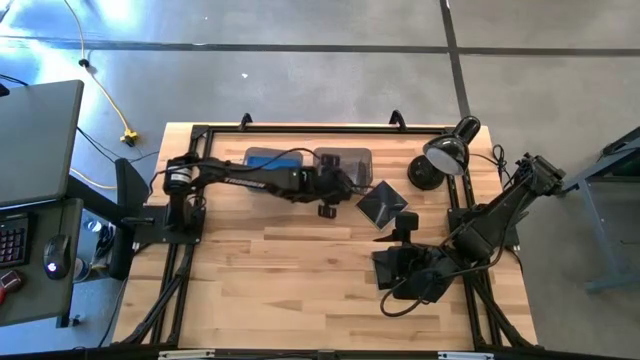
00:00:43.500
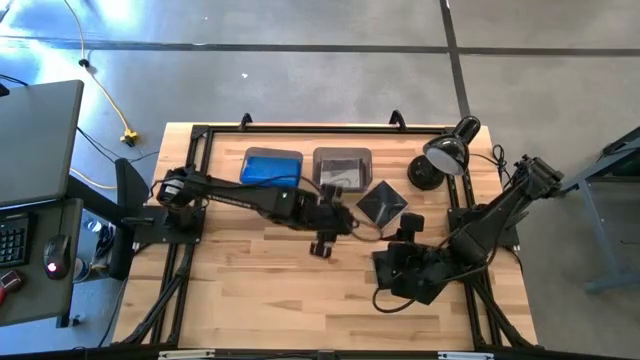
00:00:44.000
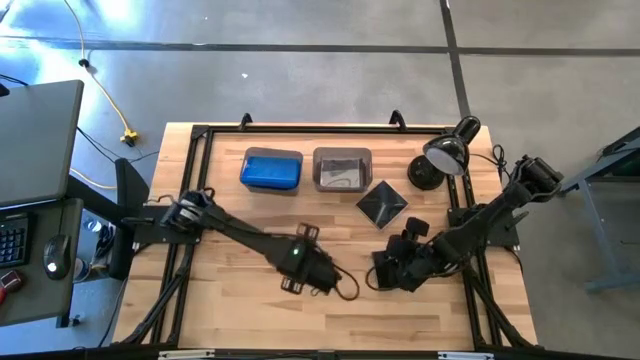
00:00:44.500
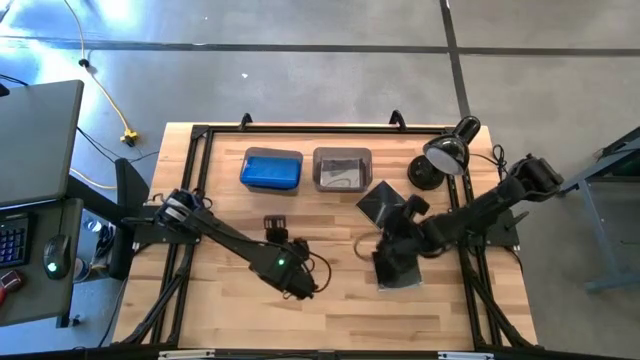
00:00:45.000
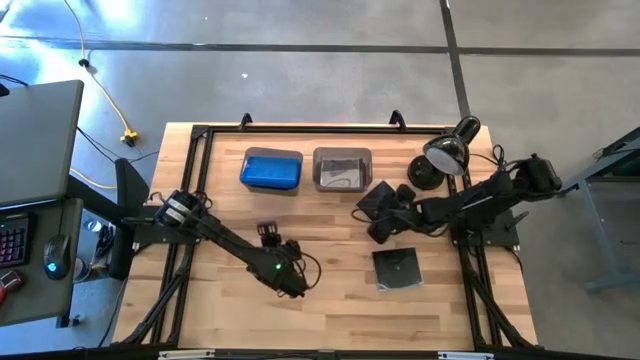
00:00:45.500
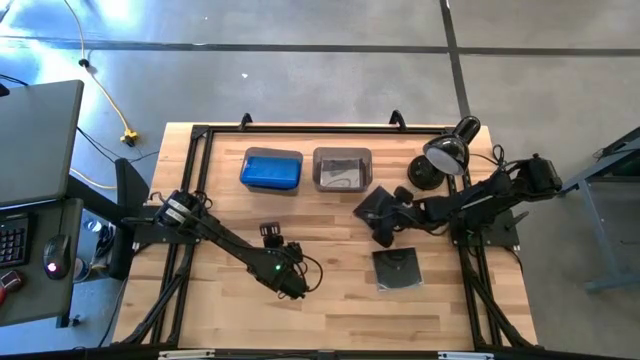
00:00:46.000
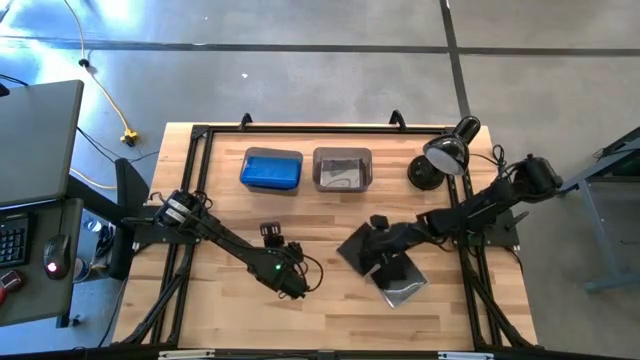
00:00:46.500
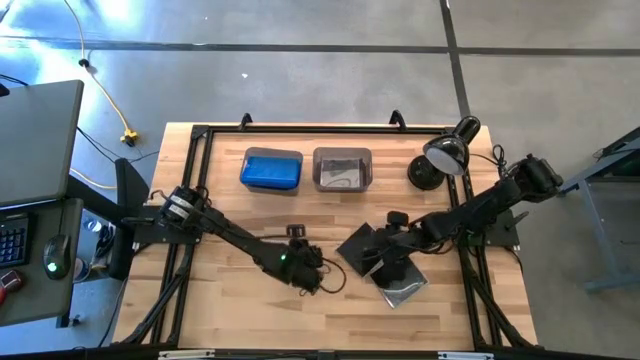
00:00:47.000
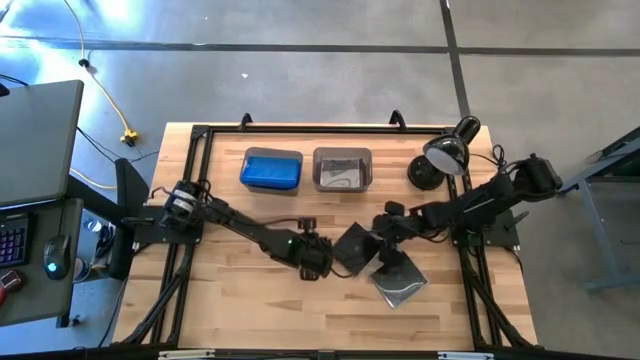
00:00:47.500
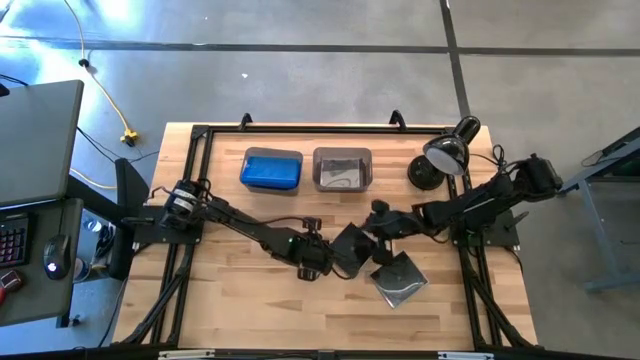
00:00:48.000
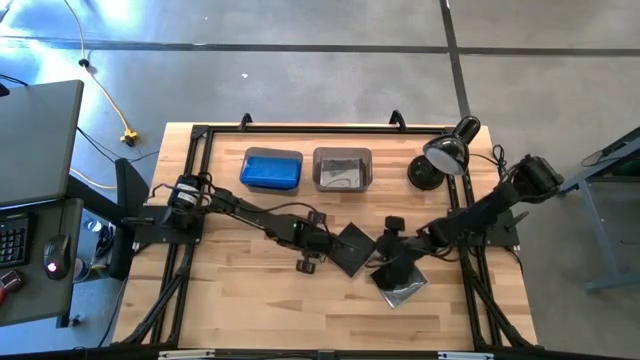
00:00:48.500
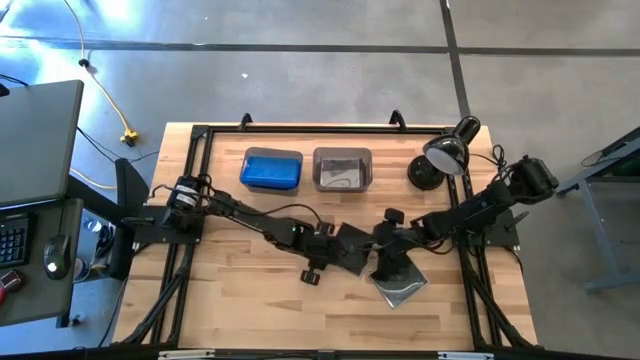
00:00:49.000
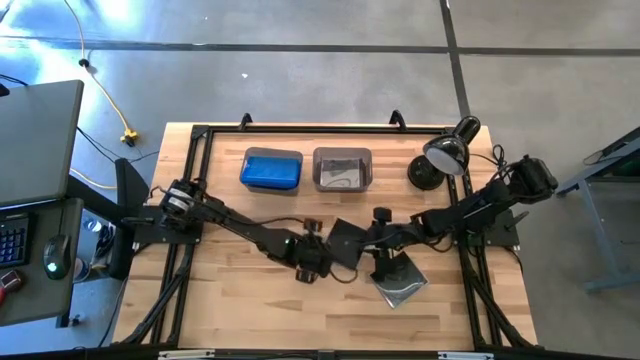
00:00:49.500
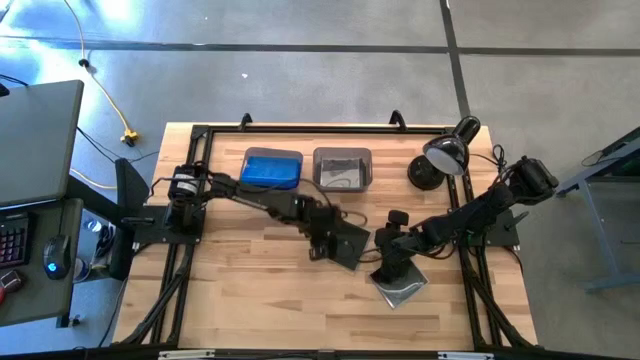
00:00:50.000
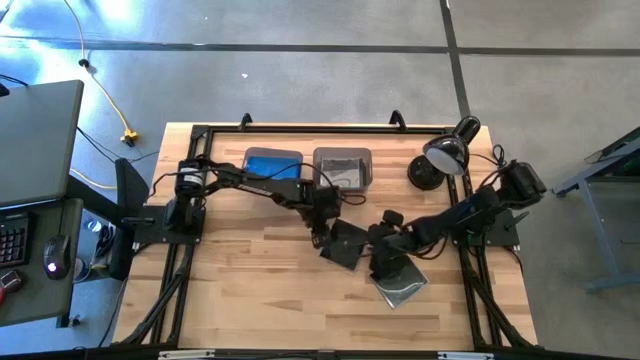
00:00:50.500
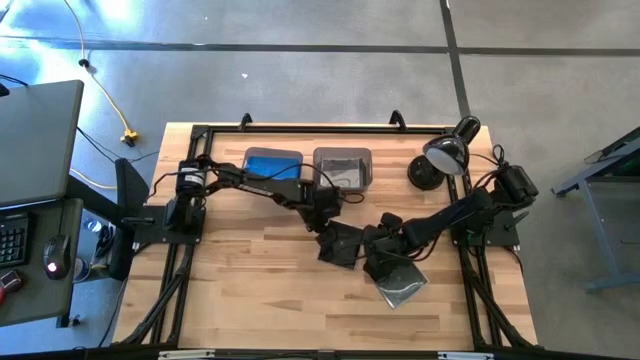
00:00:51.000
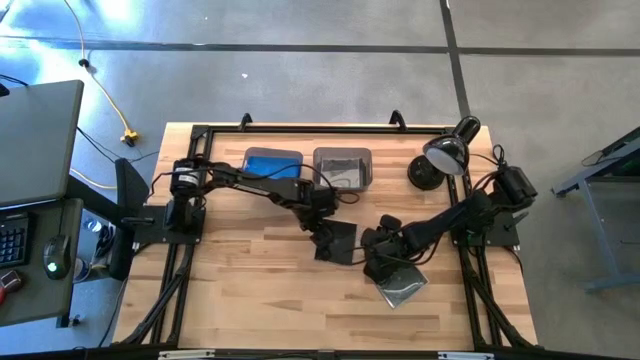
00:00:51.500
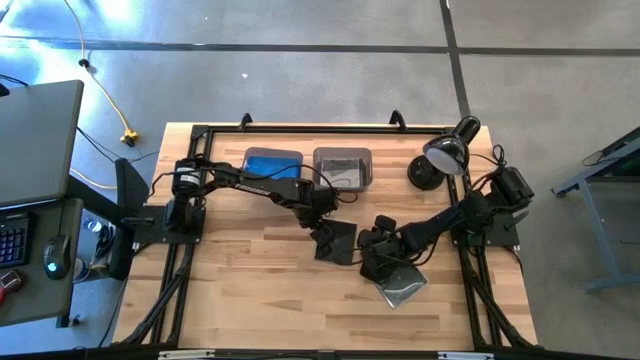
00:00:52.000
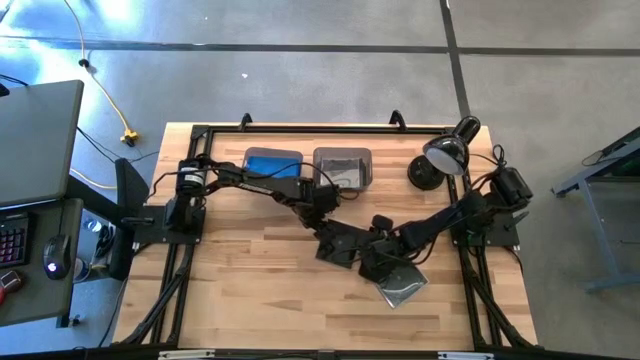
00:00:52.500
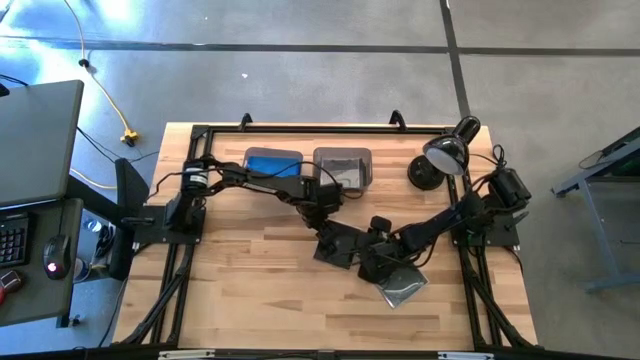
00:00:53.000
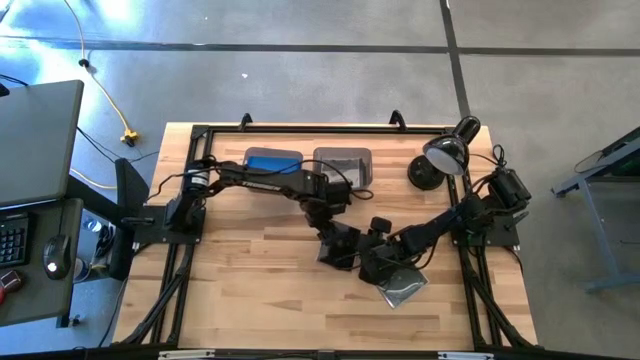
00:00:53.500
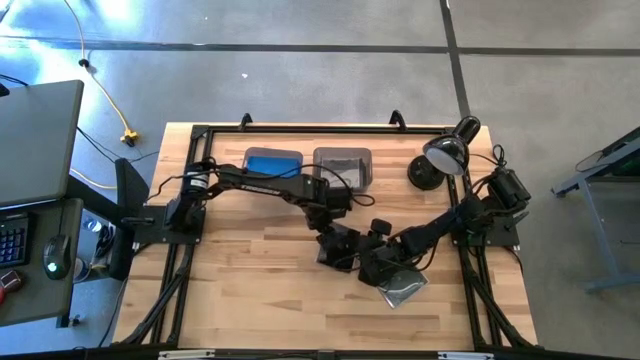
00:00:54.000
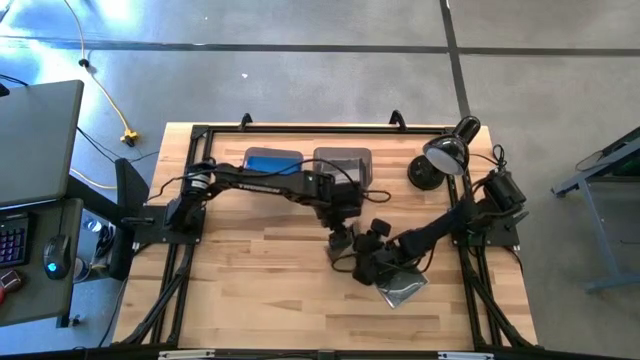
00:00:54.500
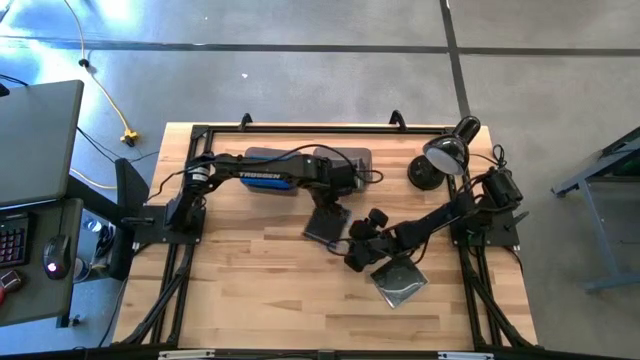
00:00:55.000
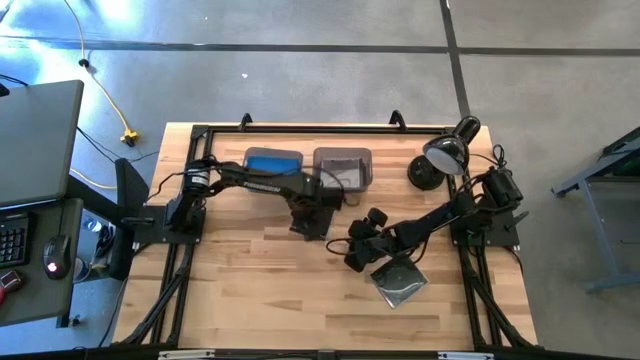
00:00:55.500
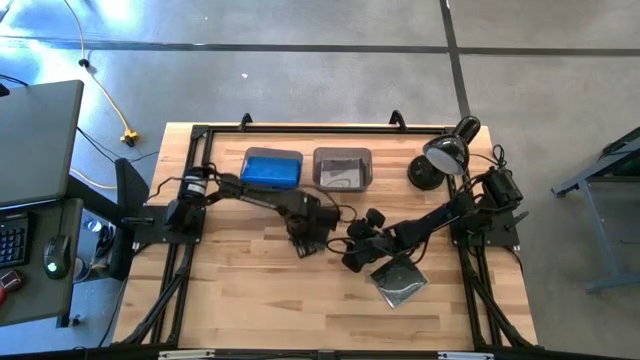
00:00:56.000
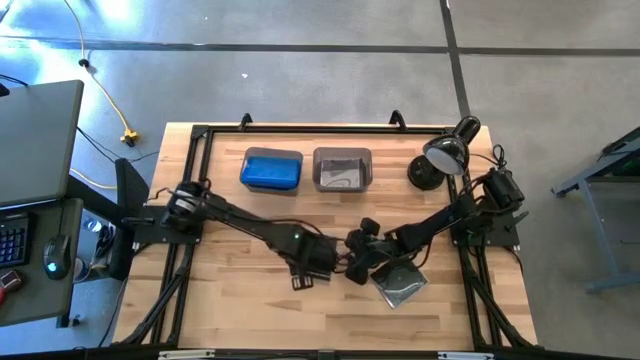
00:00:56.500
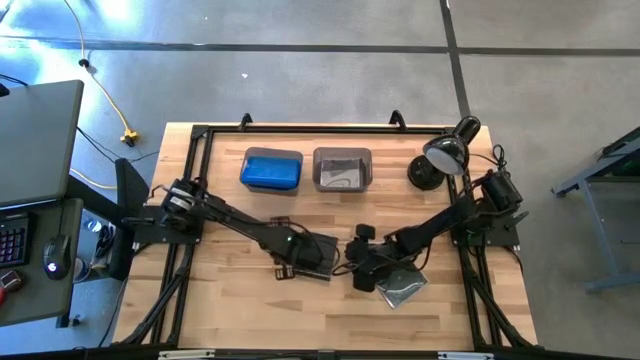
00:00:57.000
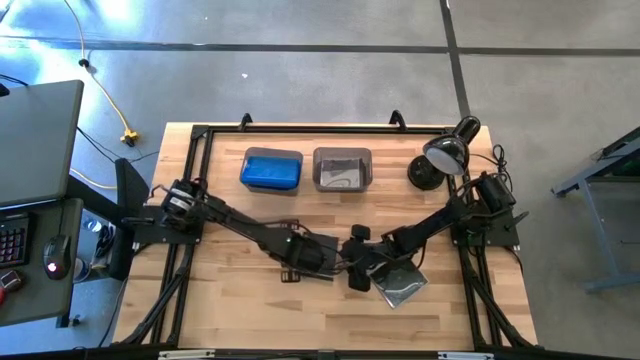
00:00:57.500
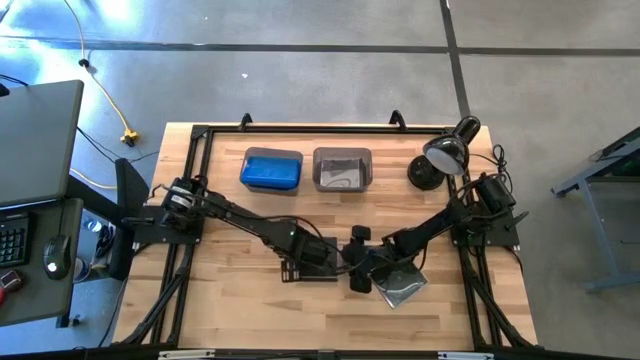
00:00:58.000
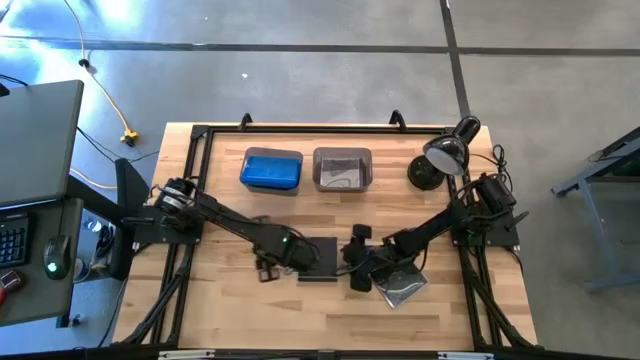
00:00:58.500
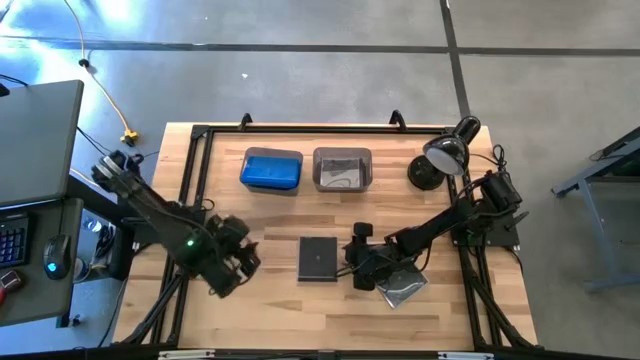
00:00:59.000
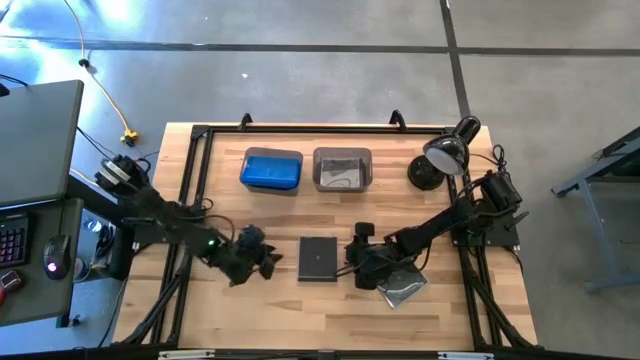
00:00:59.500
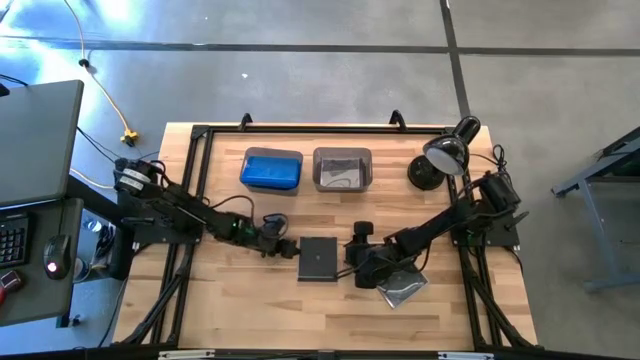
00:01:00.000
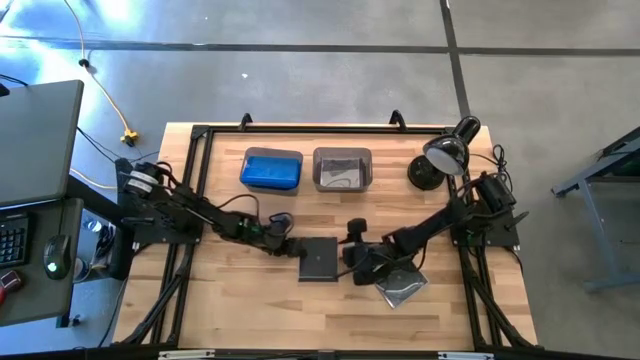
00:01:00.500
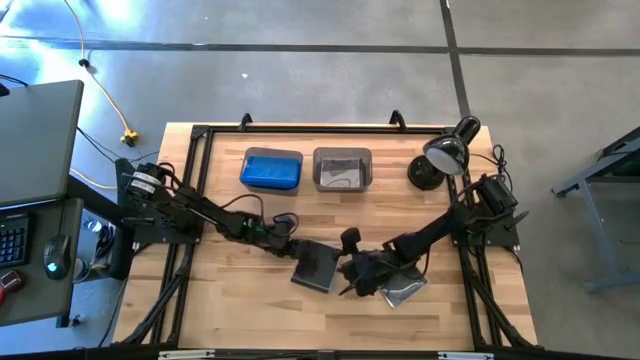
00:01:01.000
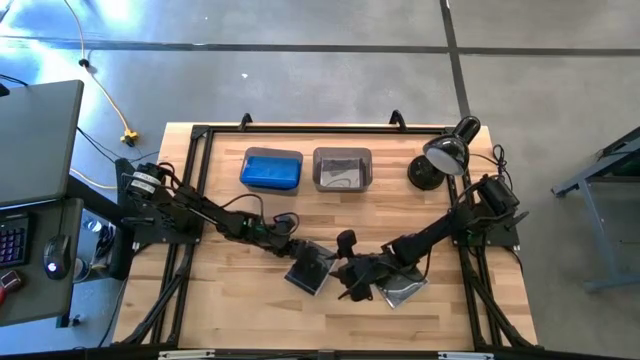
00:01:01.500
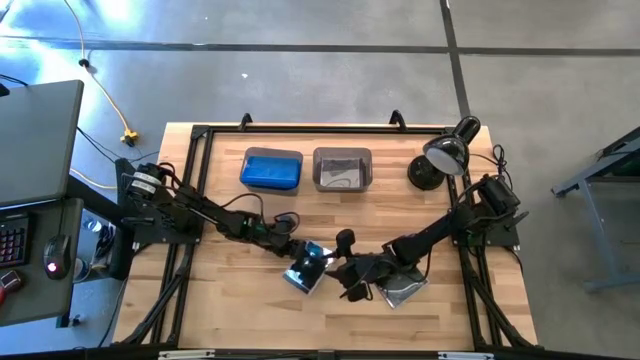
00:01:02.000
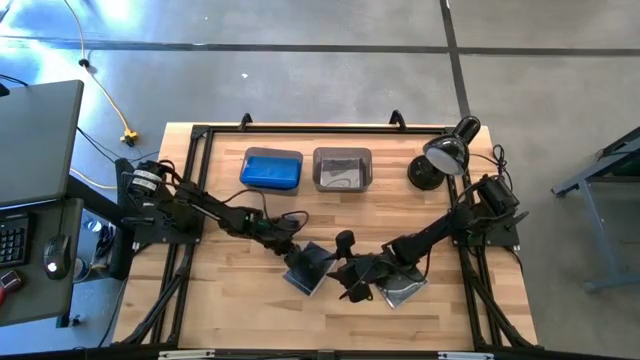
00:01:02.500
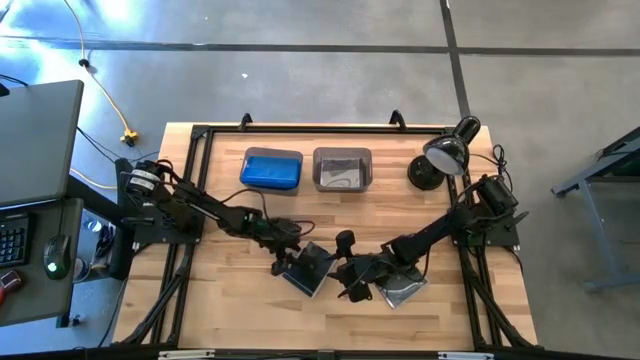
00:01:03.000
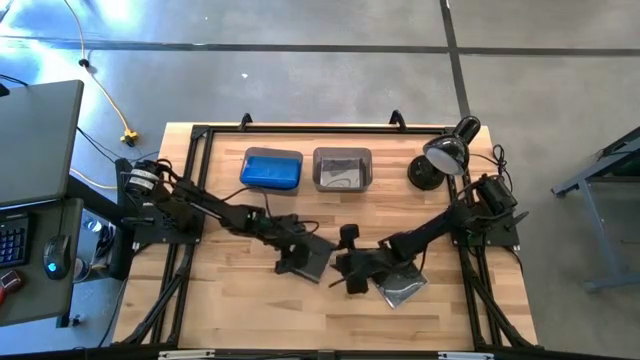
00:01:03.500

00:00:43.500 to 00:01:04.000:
Task: Pick & place jewel cases by type
Put the top black CD case into the right black bin

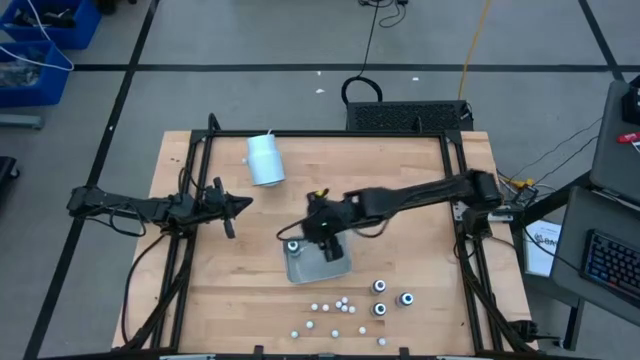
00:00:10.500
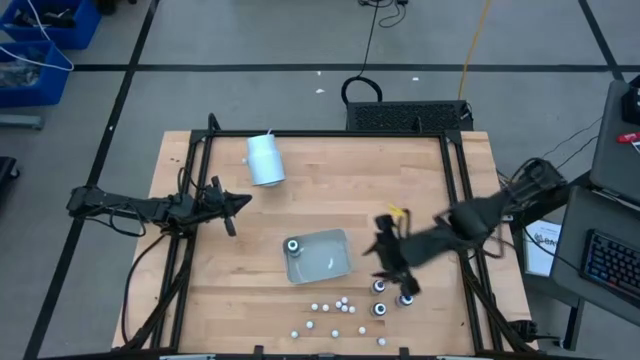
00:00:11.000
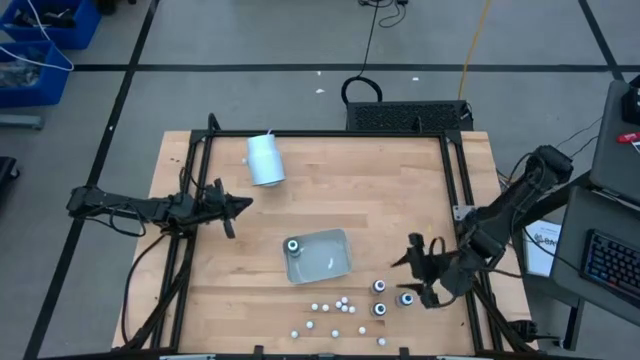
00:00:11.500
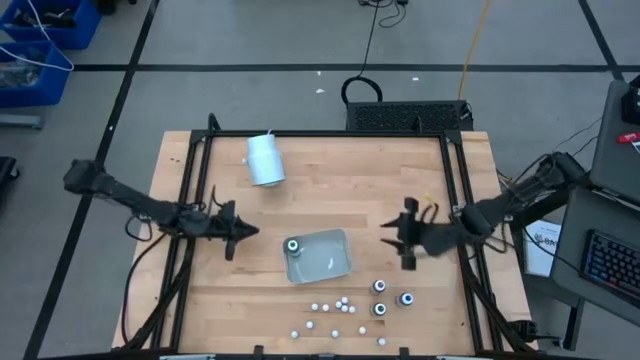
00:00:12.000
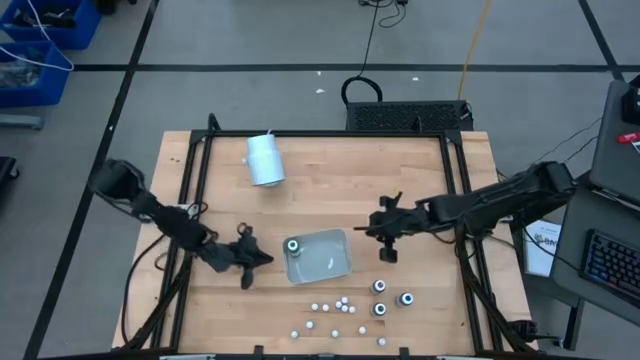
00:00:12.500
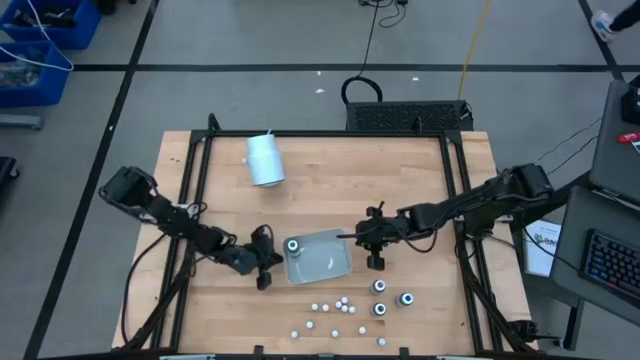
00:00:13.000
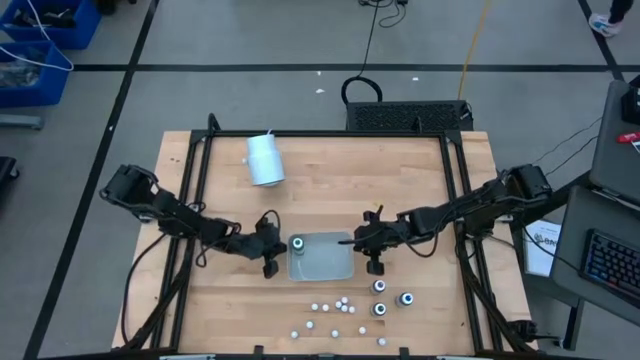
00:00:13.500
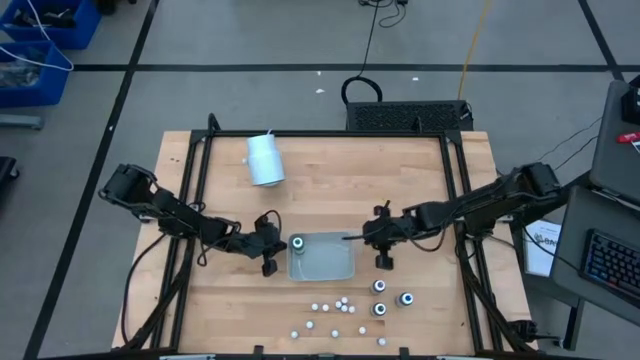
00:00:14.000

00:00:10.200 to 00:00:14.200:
Task: Pick & Place food coloring
Adjust the gray bin on the table
